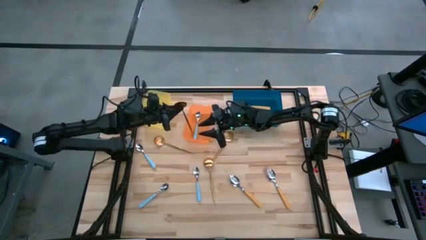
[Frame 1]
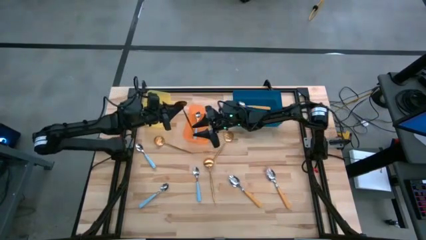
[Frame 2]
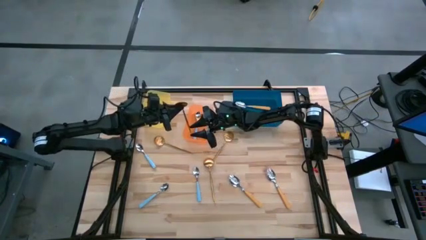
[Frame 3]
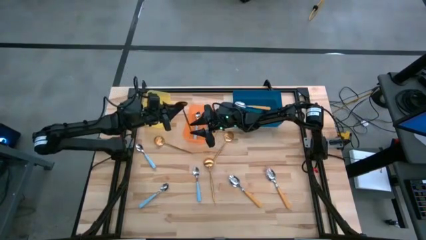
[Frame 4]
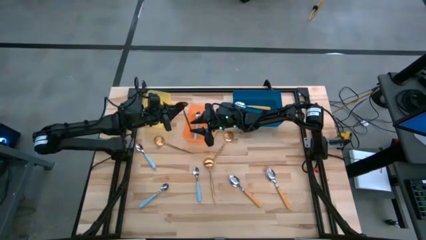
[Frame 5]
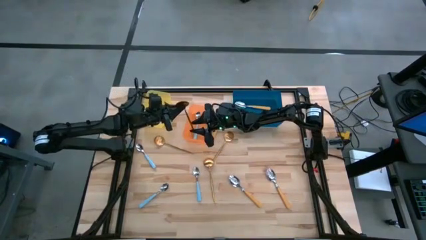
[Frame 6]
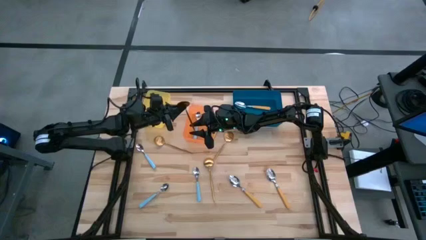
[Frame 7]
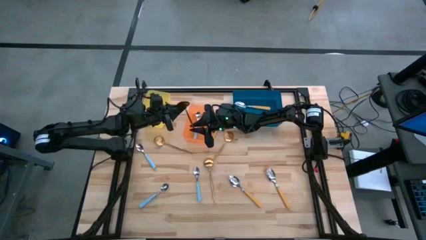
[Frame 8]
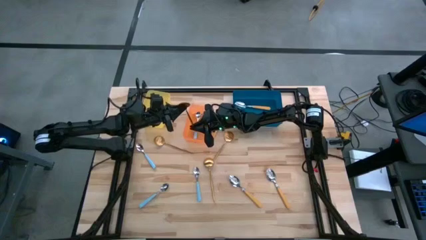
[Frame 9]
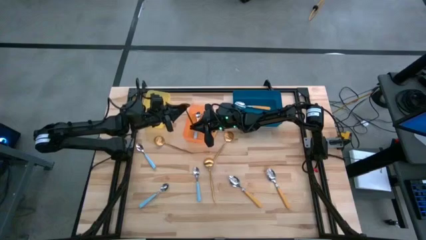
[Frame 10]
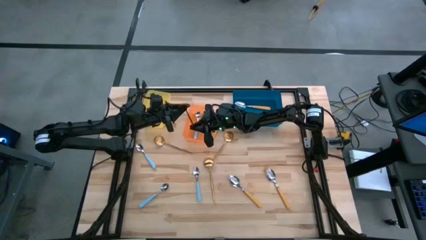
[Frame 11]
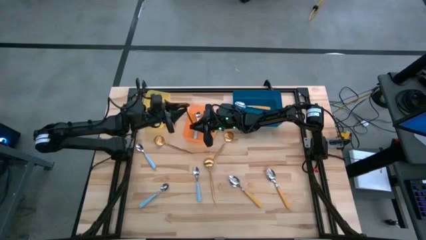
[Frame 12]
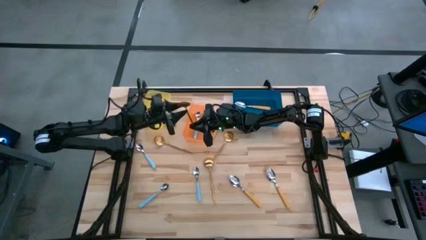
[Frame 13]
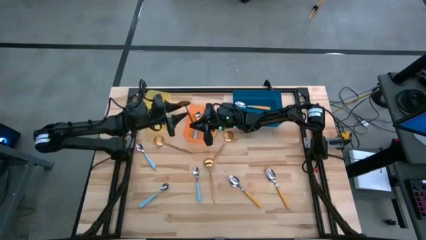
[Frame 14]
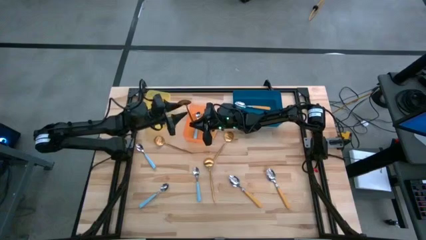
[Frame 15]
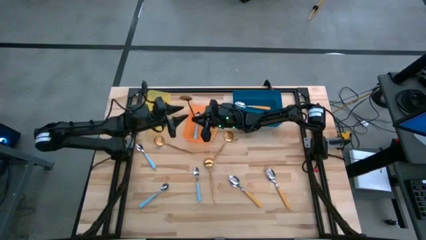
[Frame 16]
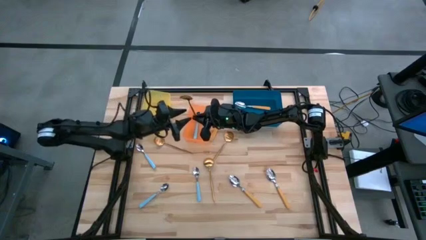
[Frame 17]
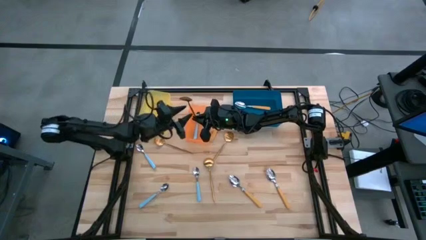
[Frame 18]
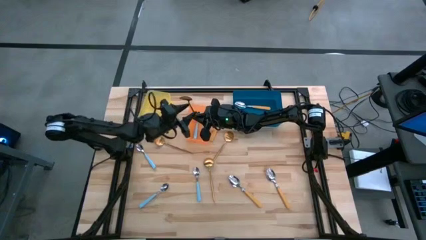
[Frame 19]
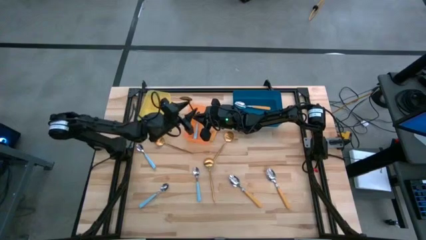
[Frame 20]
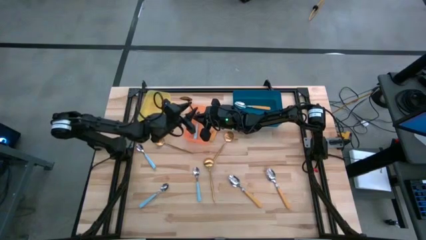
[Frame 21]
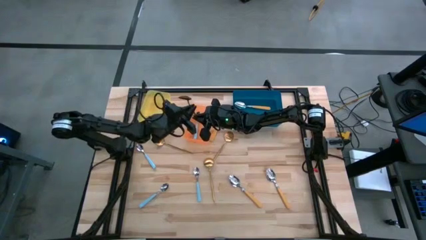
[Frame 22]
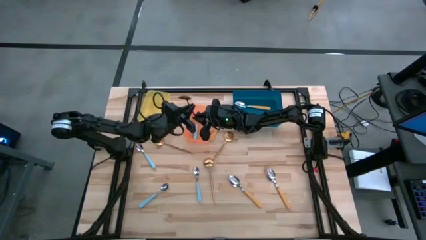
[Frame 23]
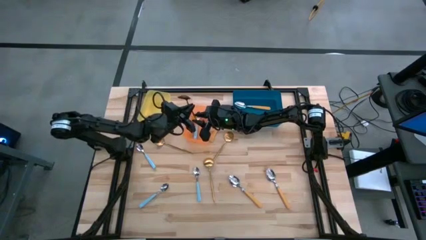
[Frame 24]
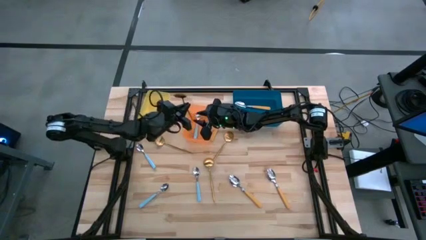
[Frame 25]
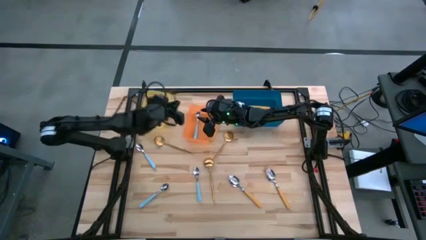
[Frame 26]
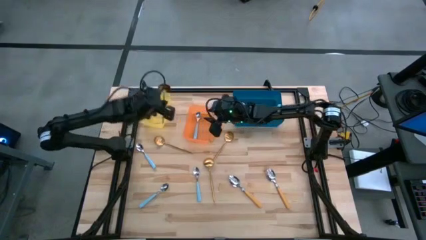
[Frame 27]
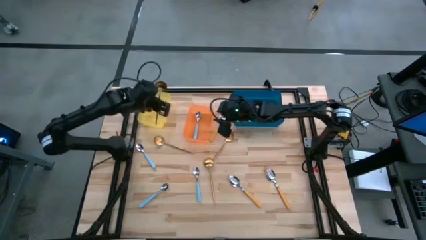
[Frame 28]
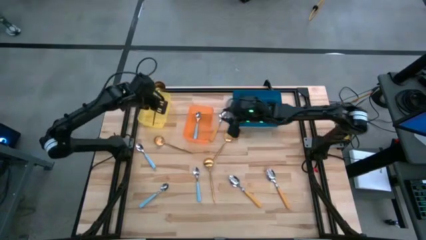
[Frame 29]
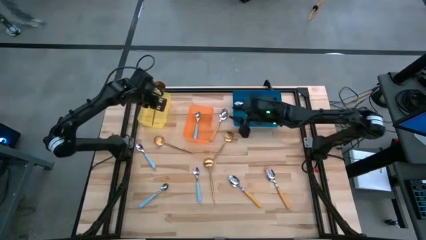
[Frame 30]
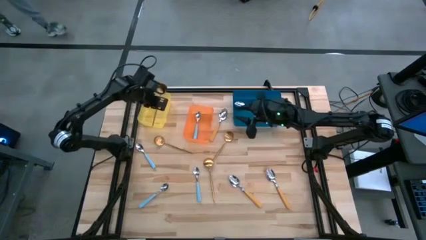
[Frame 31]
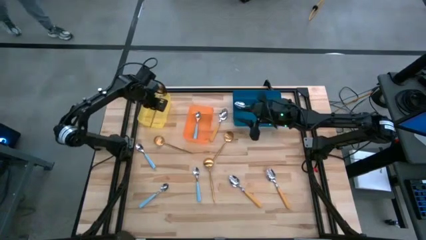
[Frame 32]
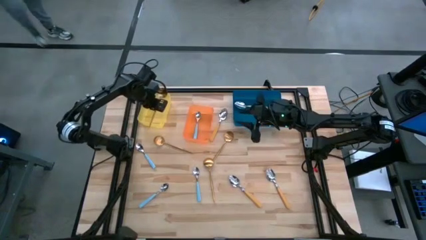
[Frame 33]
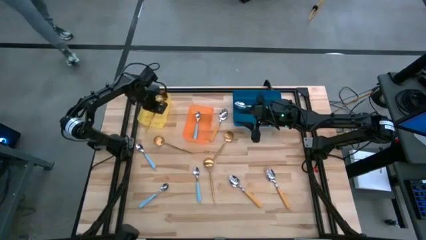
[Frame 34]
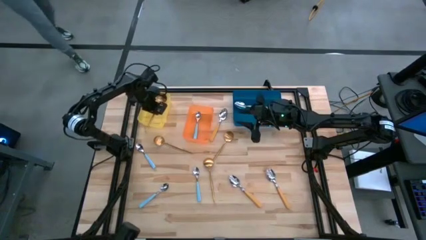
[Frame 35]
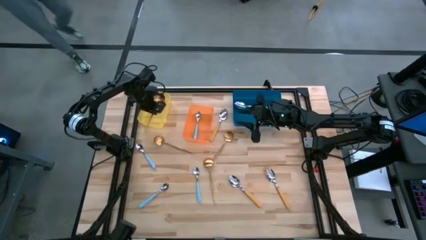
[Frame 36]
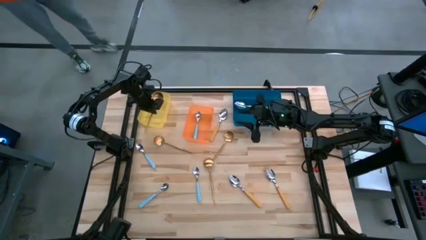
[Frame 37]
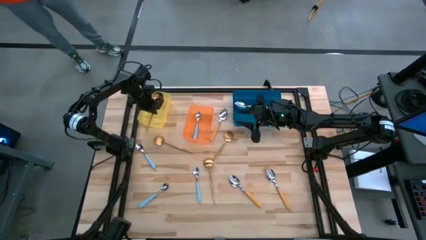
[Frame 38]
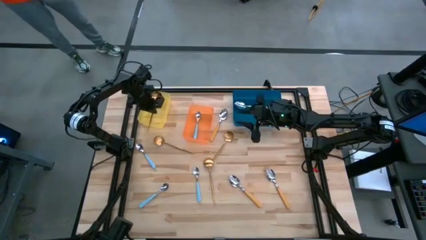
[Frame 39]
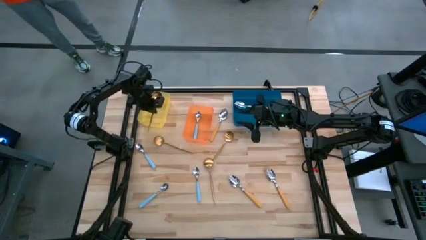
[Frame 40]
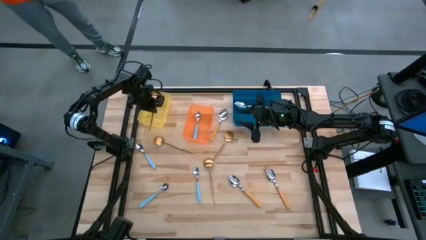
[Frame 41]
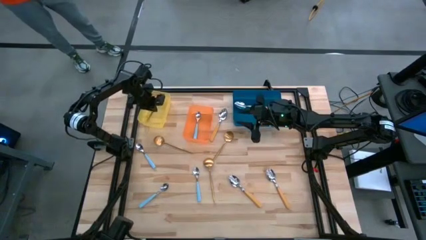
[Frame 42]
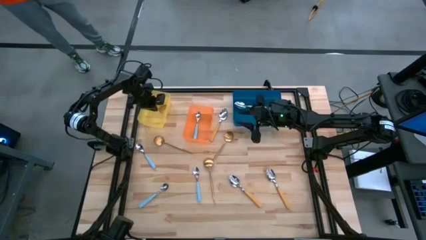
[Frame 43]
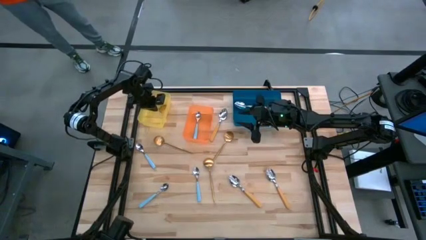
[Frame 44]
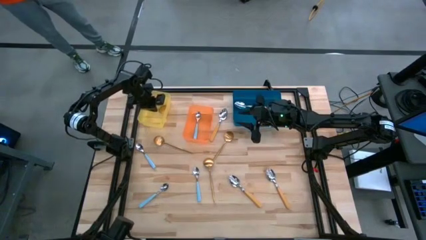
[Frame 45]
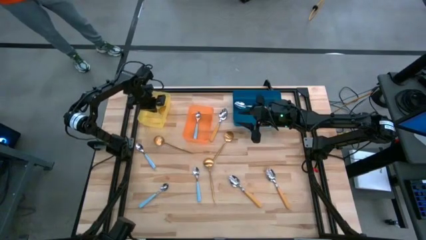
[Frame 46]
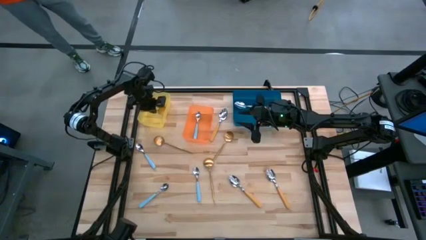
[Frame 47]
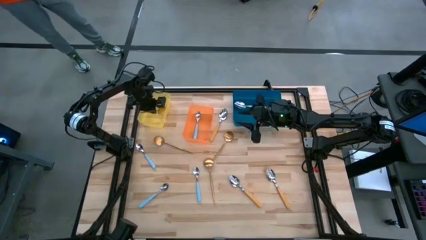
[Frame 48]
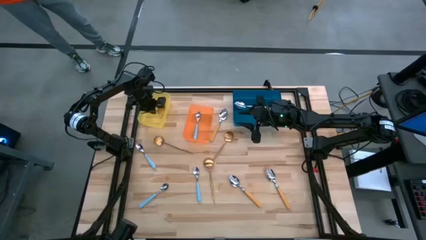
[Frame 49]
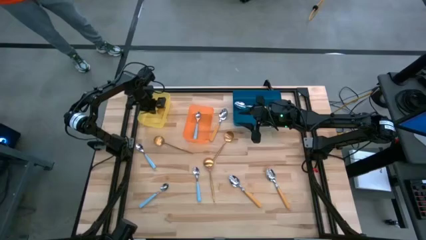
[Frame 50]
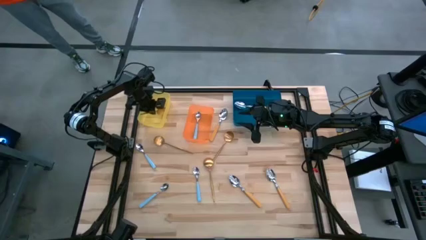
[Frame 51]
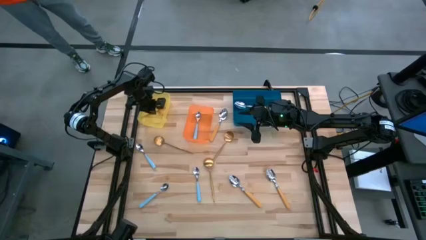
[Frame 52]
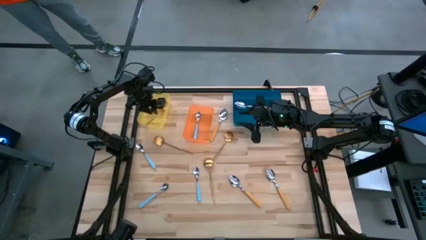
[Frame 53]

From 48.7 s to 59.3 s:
Task: Sort silverware by color (type)
Put the gold spoon into the yellow bin
